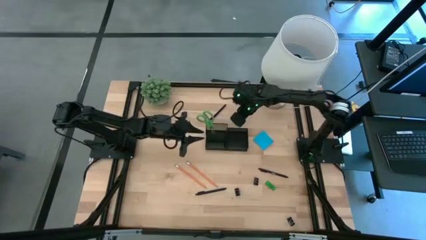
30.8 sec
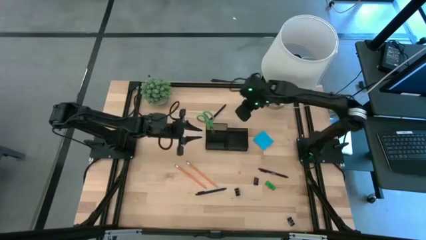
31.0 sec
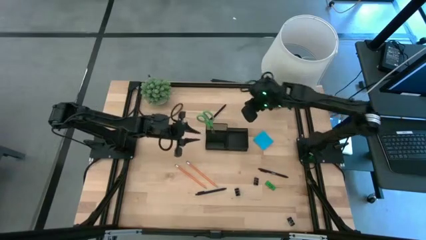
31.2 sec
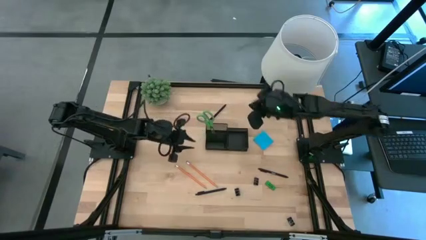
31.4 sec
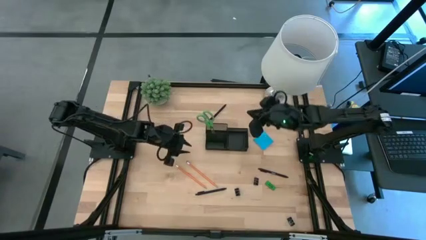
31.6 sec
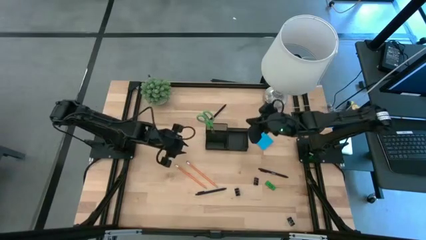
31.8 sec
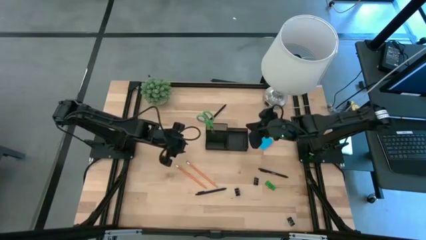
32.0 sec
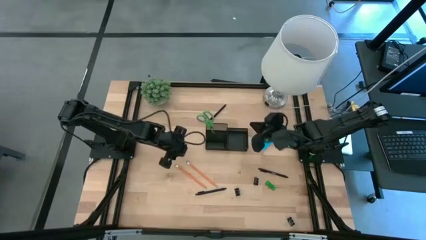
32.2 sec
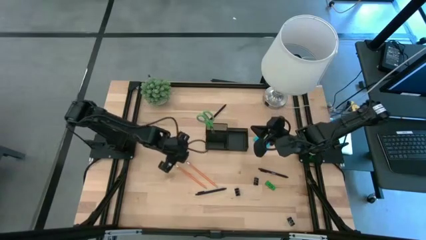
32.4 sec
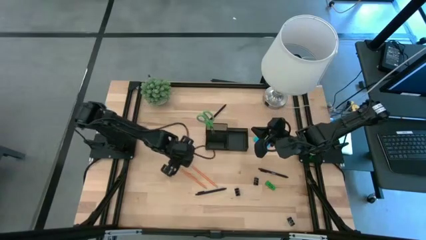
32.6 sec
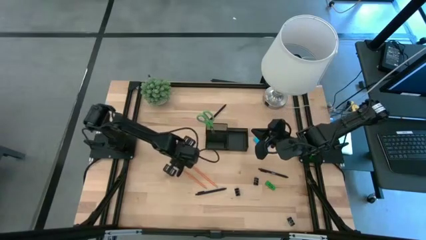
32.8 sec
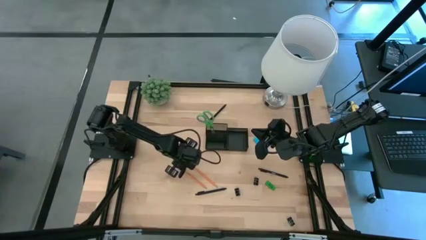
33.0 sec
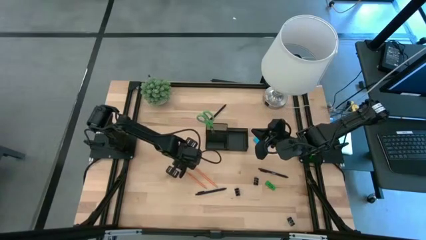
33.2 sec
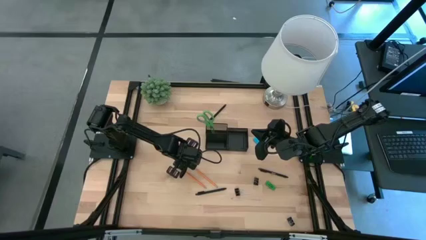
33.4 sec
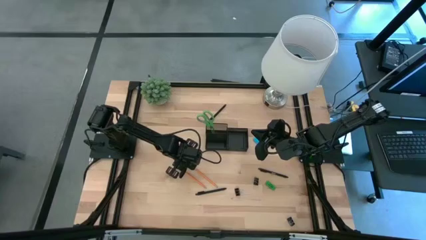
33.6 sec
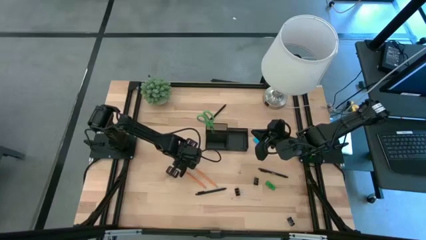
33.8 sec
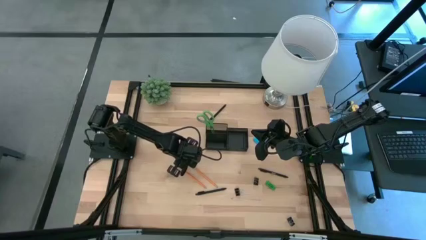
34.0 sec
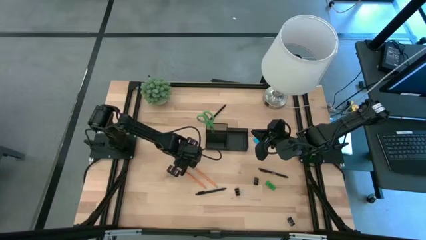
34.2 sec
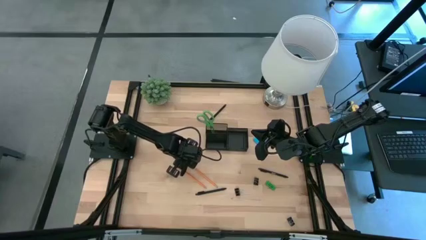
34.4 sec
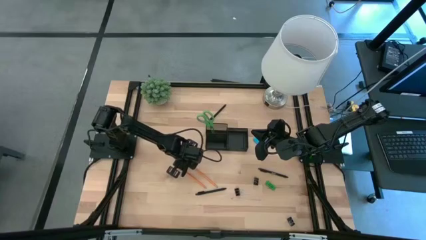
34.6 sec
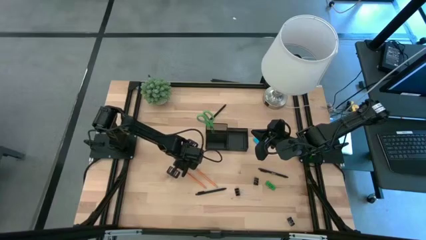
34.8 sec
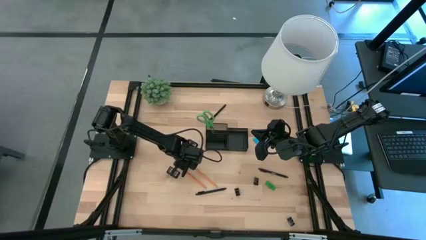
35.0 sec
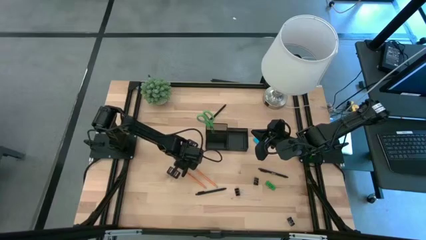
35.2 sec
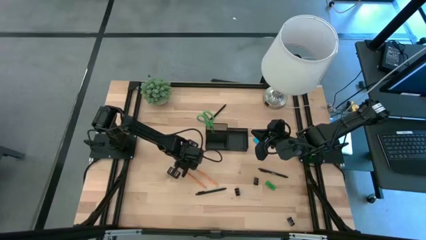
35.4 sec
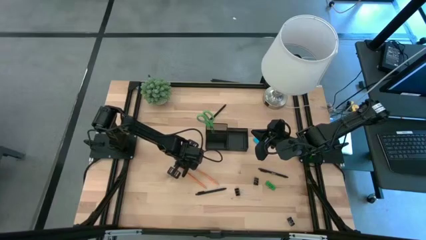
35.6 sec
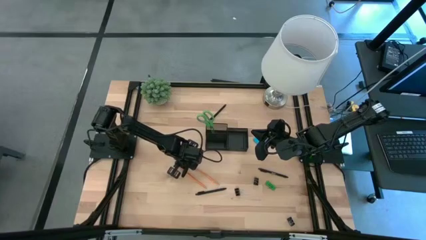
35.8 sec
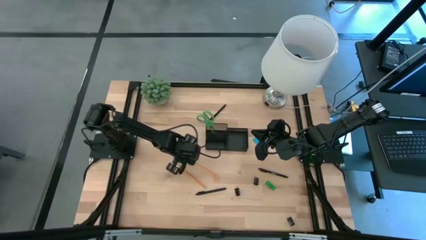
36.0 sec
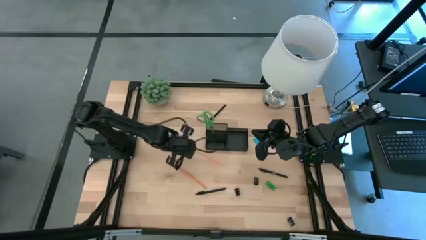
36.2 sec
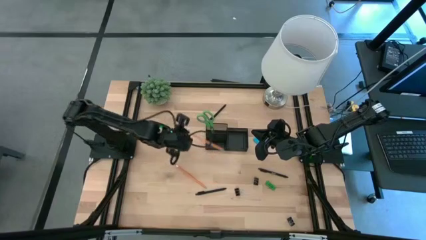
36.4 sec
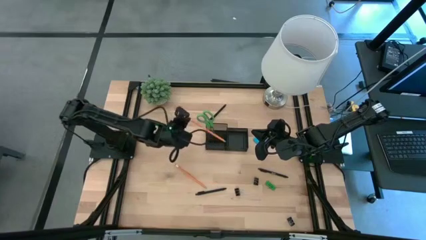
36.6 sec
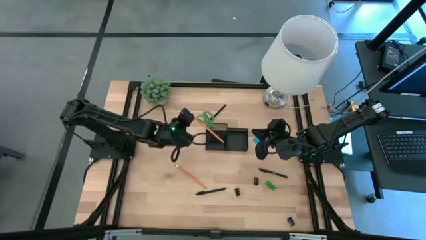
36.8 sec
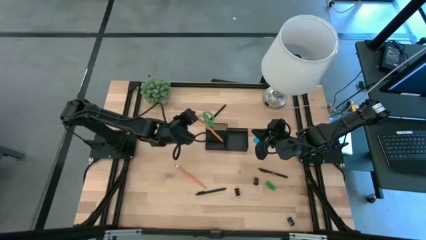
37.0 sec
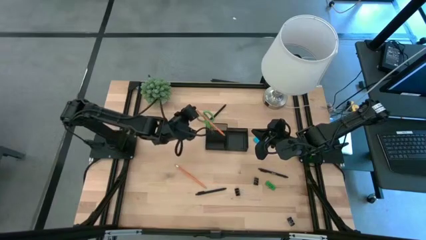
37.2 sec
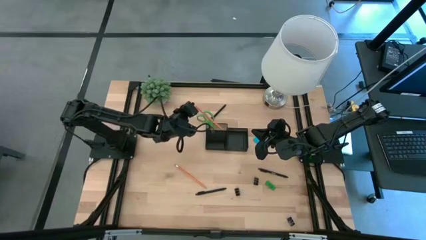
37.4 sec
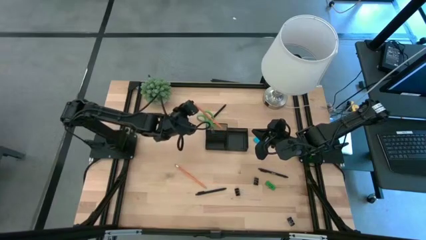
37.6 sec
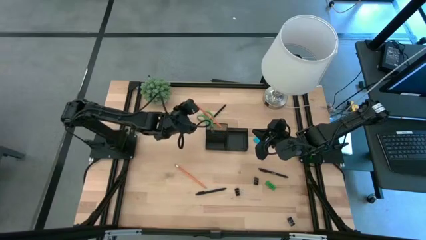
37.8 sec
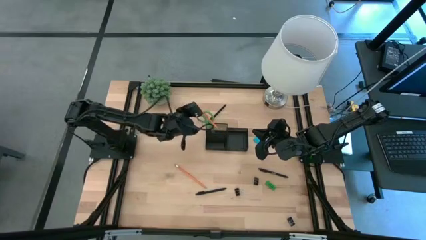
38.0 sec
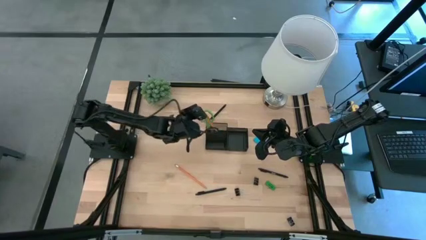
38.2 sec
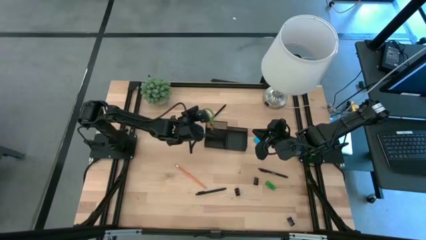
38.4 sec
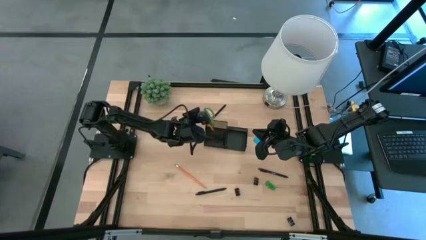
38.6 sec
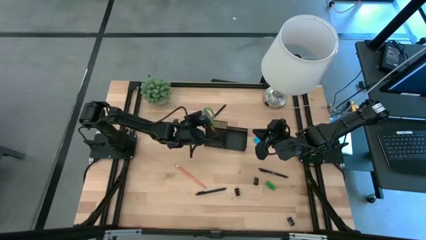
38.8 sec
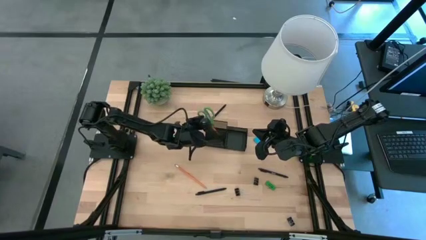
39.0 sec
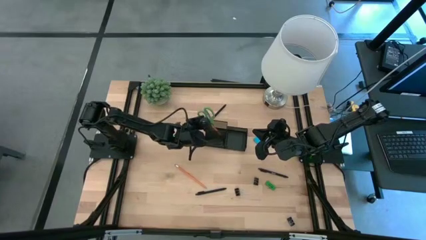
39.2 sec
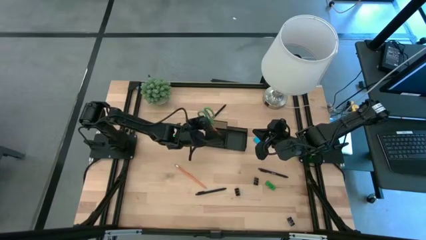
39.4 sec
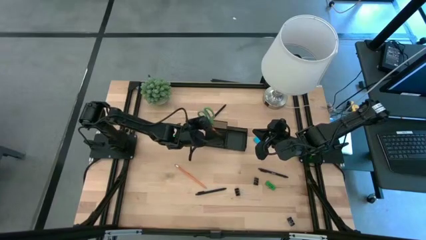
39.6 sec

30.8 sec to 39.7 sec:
Task: Pick and place office supplies into organizer
Put the right orange pencil into the black organizer

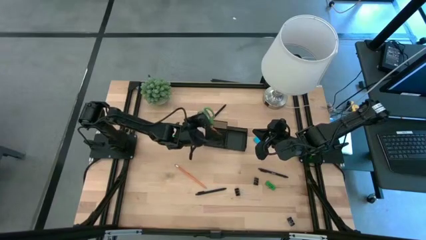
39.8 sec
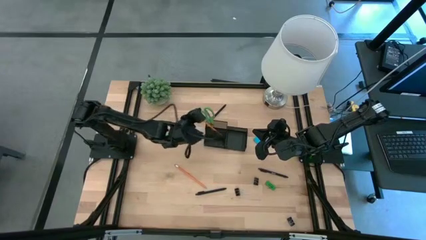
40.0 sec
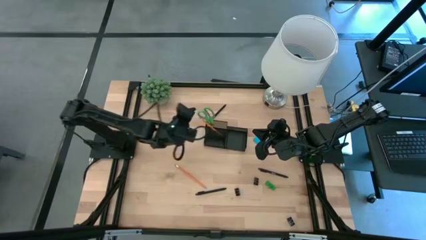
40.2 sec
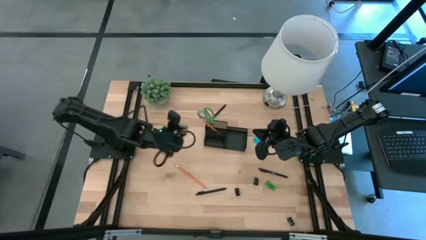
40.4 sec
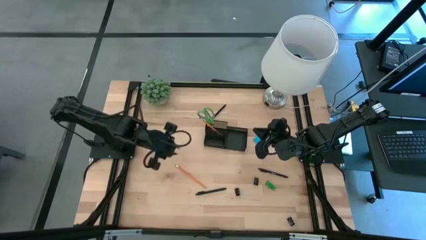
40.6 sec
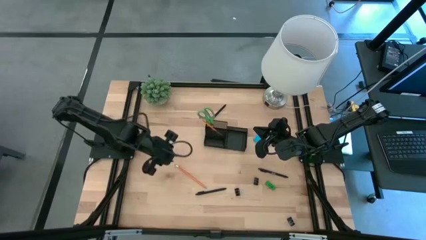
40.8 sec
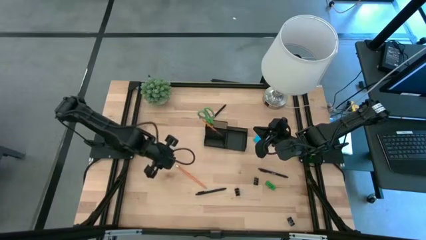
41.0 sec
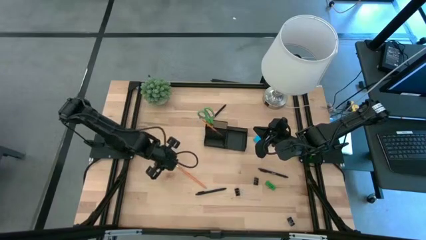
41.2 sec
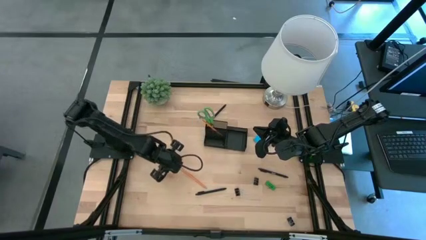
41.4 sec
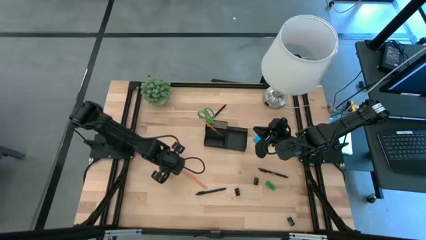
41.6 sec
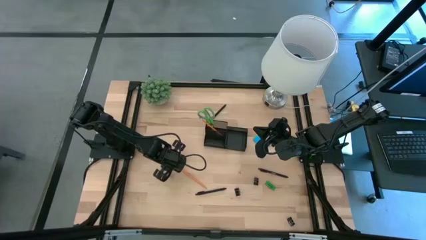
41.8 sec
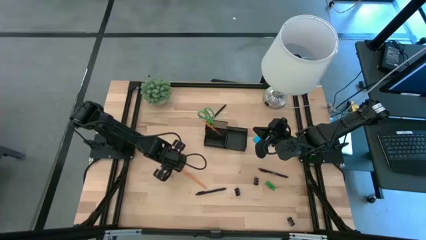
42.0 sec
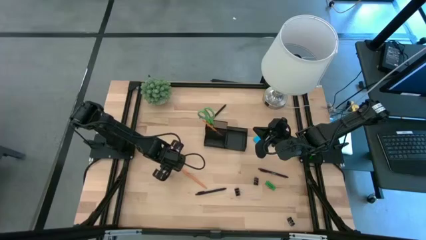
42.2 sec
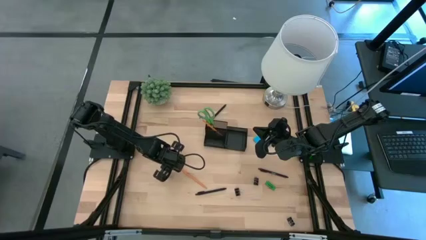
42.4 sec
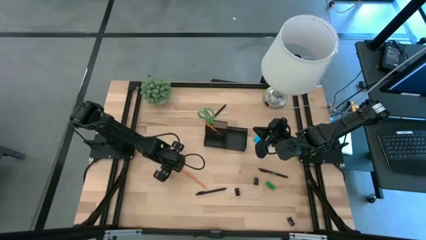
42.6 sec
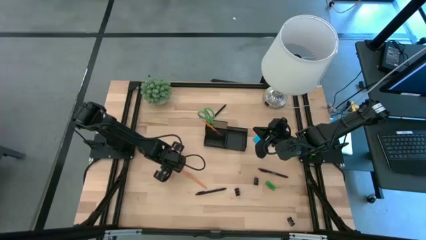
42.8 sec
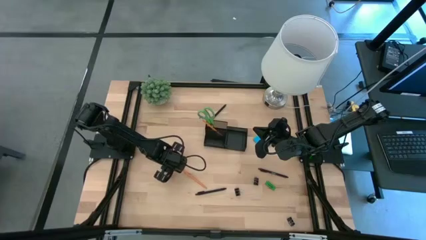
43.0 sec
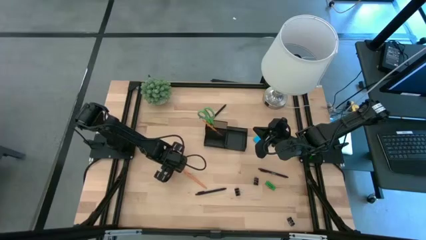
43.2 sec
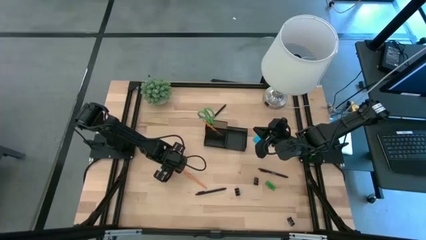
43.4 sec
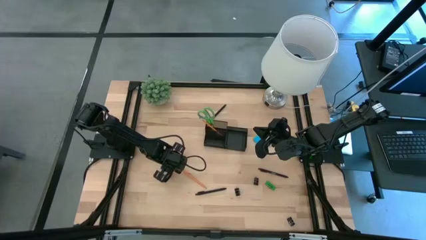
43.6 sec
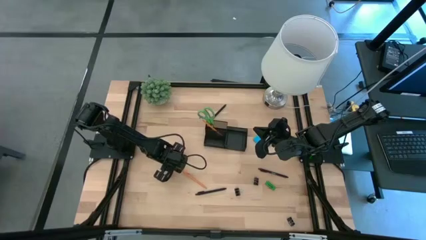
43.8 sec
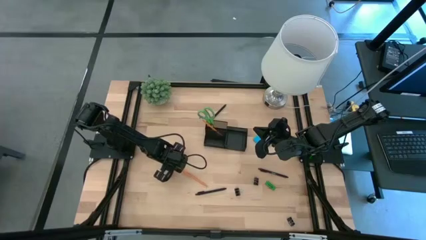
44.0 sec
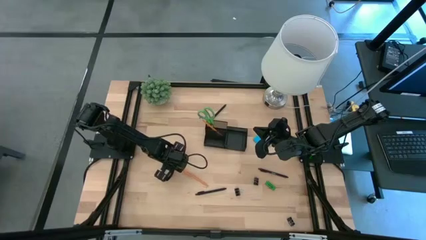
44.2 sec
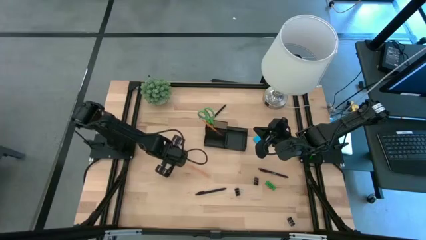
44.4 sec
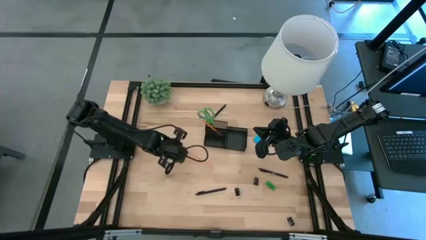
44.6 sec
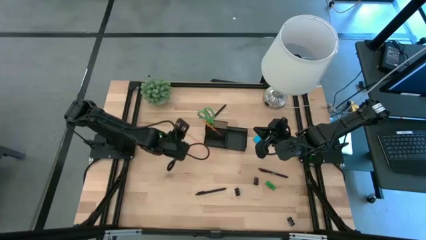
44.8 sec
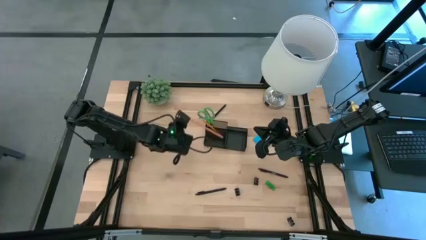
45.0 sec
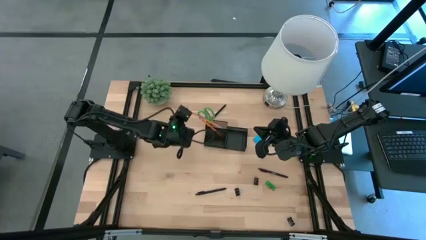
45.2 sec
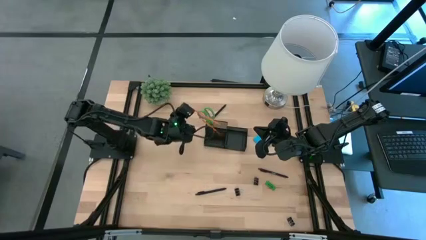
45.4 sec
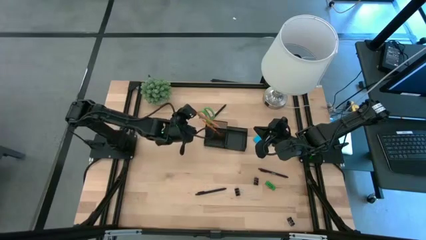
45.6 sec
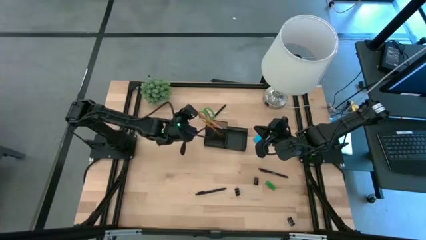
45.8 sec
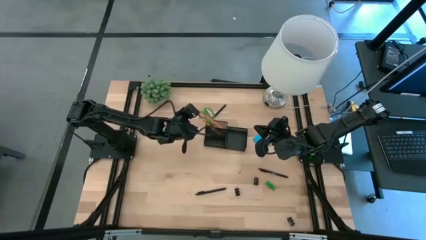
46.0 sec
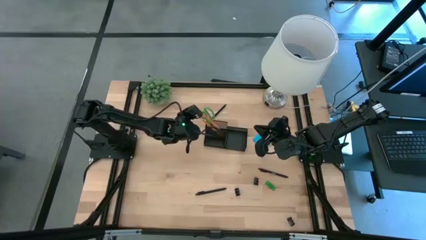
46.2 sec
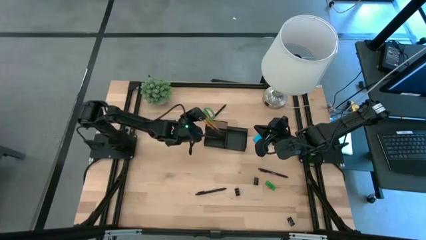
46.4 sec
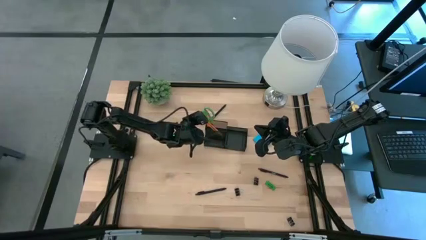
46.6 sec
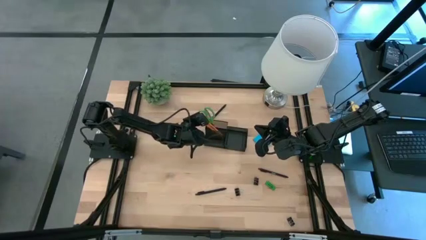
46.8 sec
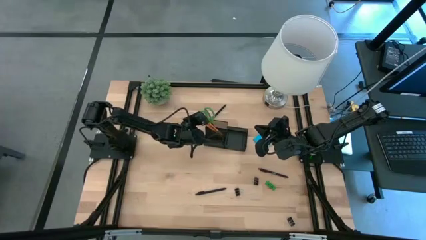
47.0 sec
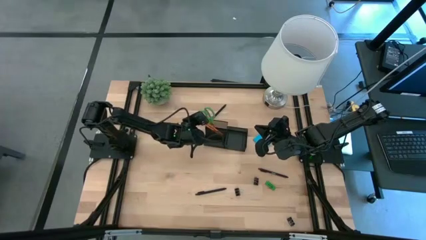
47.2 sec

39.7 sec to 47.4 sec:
Put the orange pencil into the black organizer
